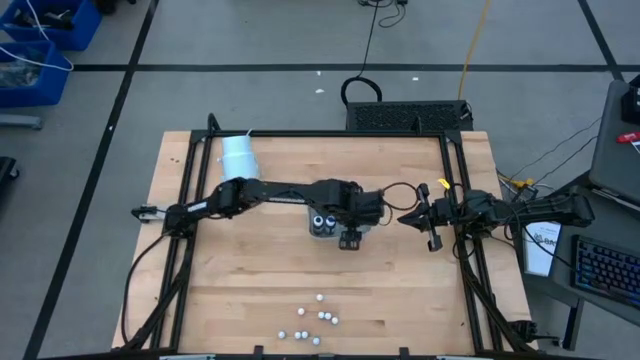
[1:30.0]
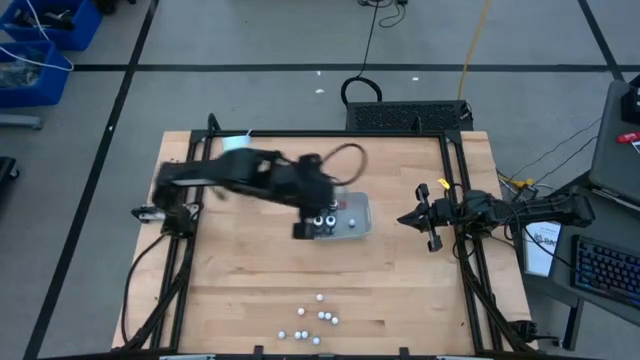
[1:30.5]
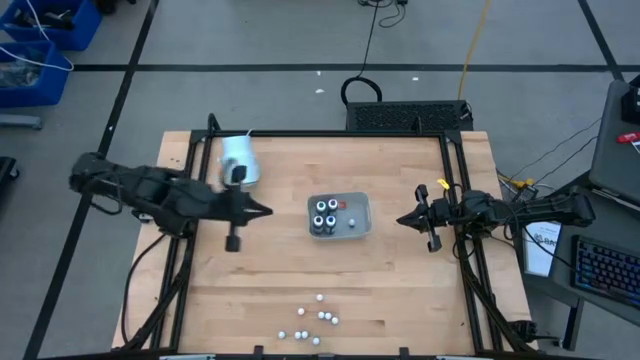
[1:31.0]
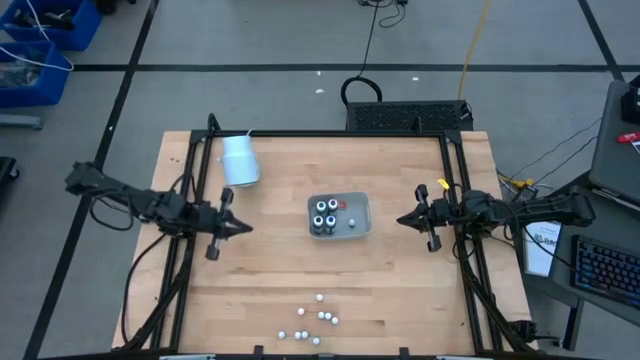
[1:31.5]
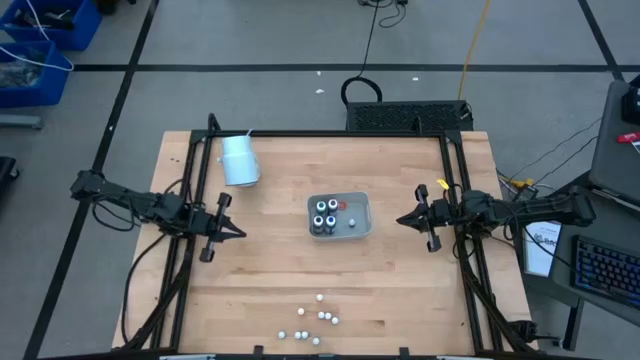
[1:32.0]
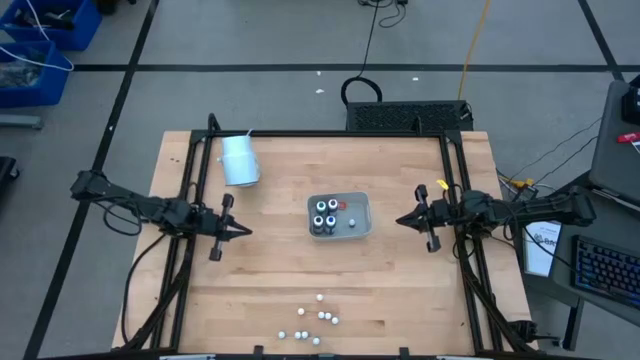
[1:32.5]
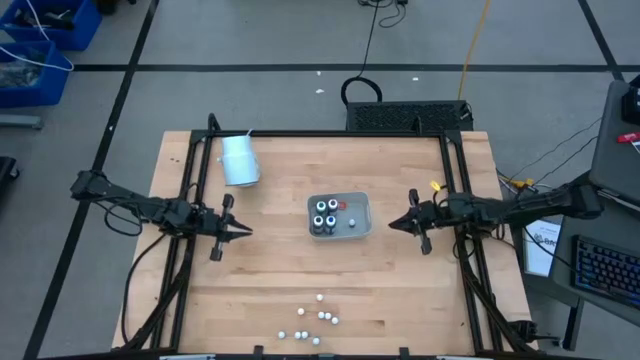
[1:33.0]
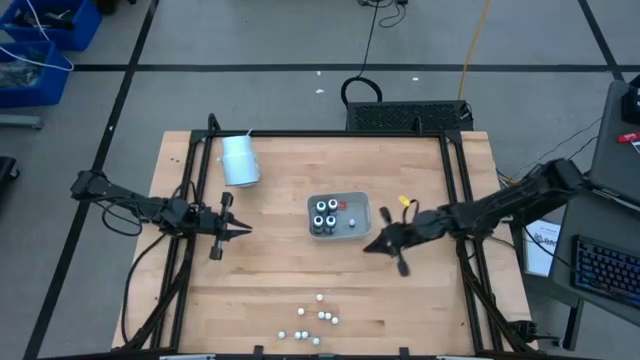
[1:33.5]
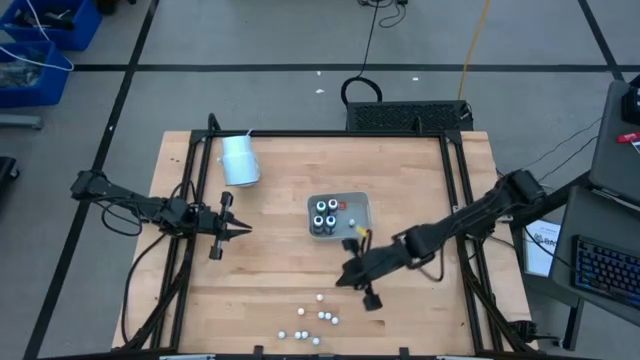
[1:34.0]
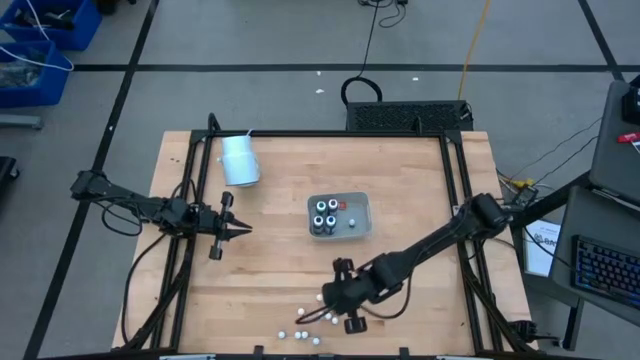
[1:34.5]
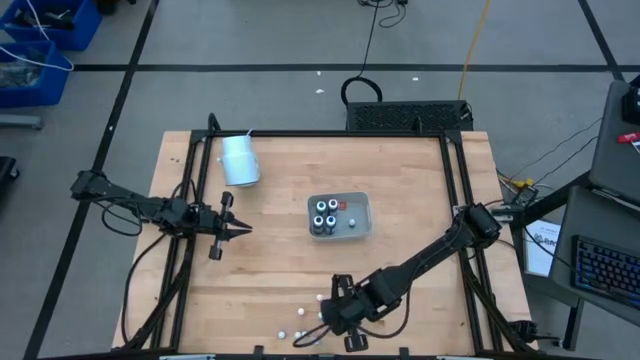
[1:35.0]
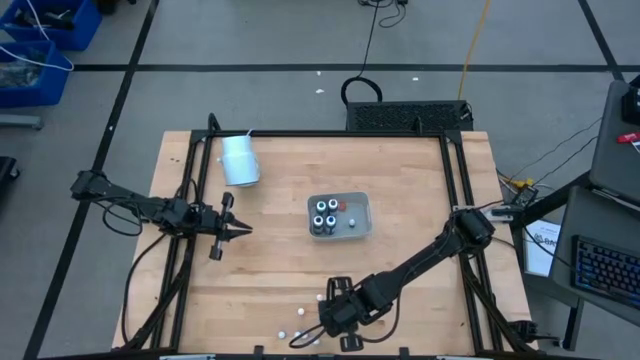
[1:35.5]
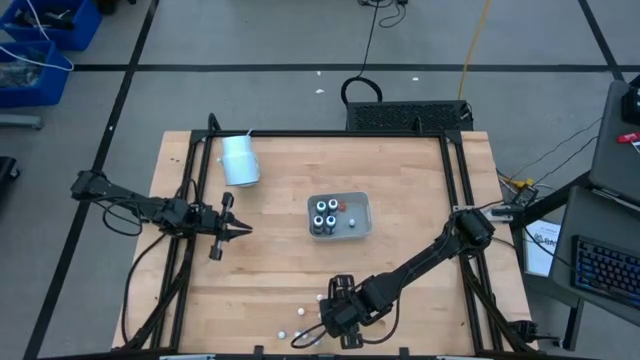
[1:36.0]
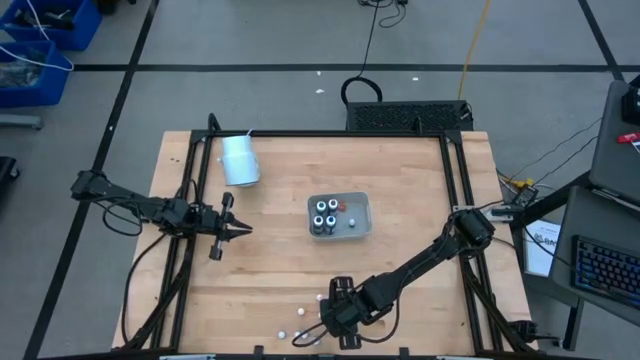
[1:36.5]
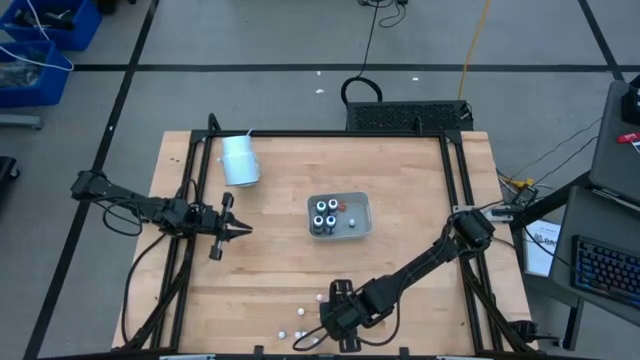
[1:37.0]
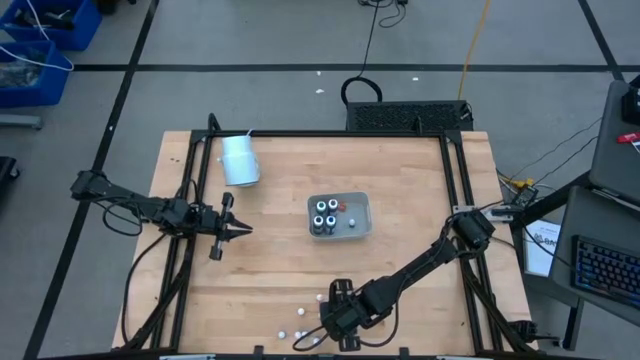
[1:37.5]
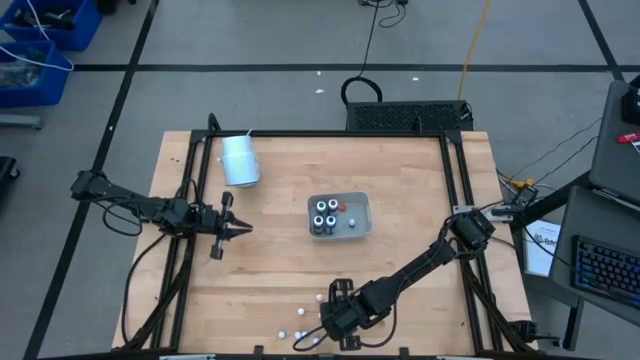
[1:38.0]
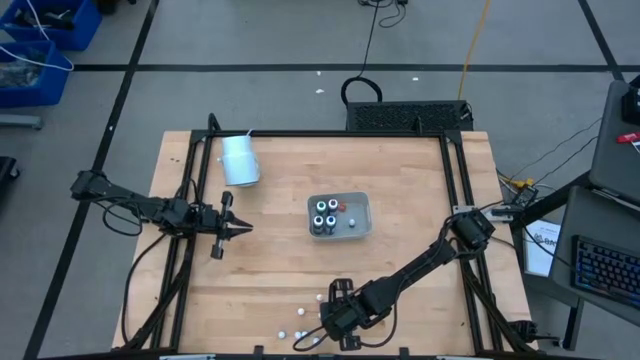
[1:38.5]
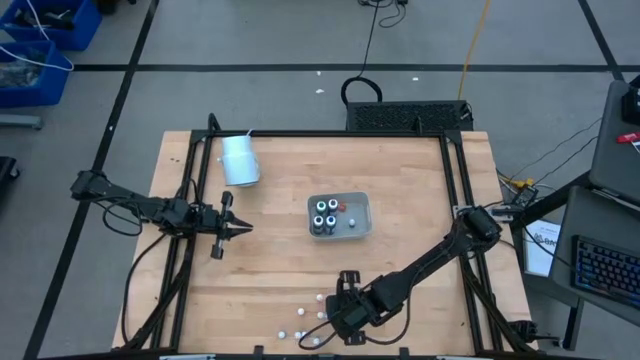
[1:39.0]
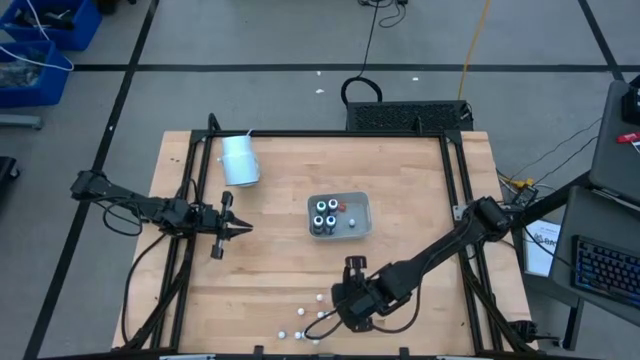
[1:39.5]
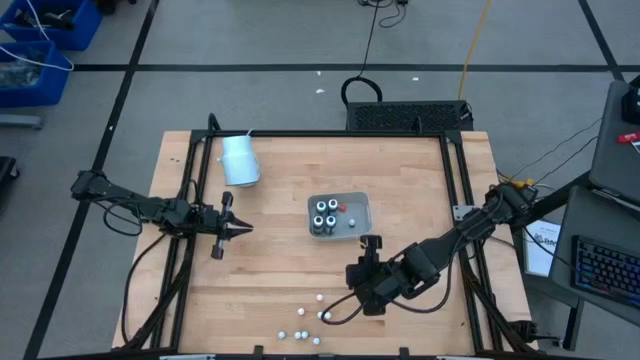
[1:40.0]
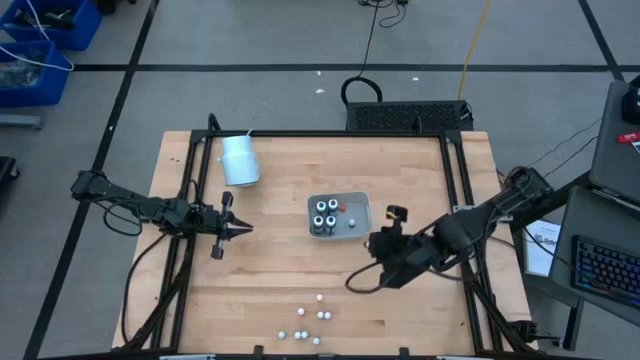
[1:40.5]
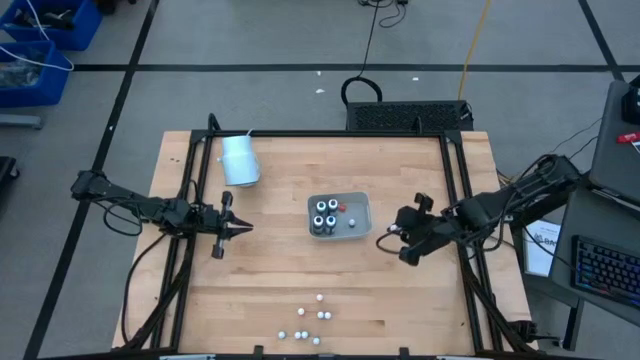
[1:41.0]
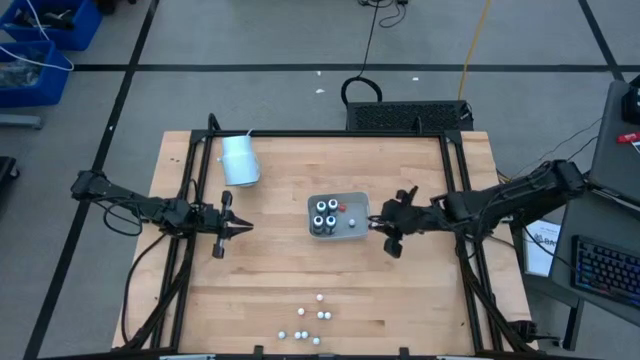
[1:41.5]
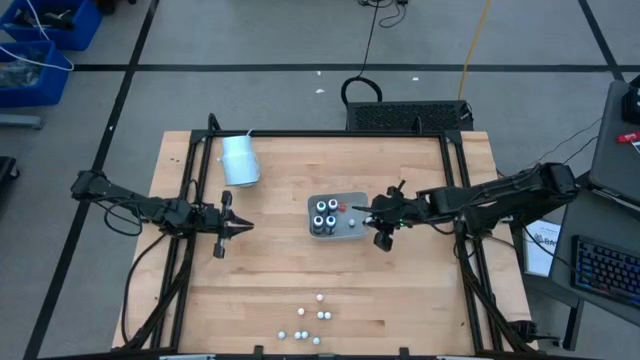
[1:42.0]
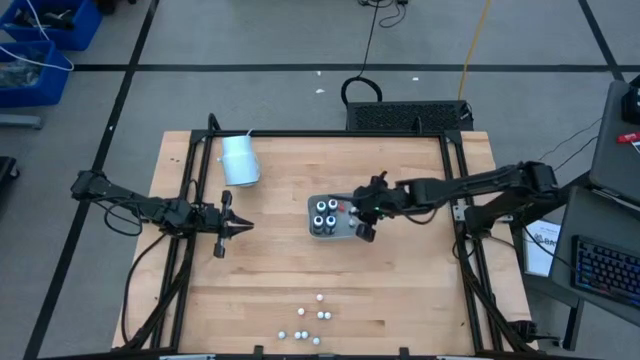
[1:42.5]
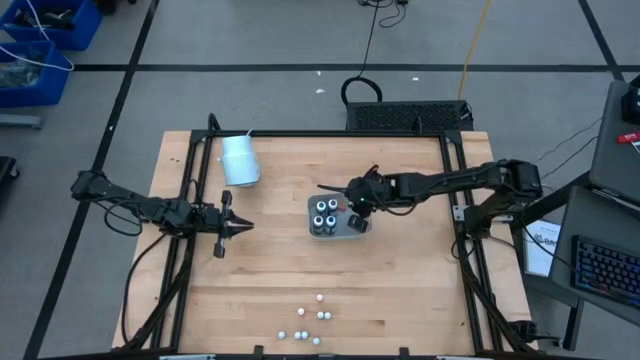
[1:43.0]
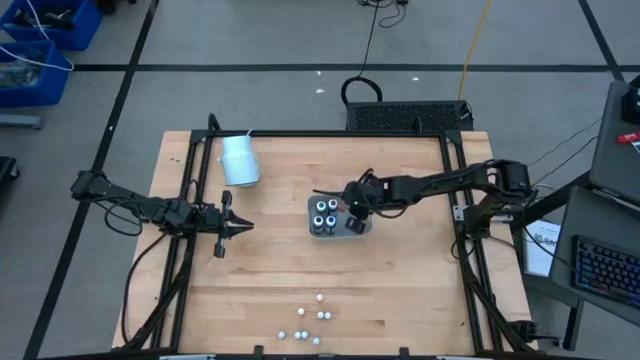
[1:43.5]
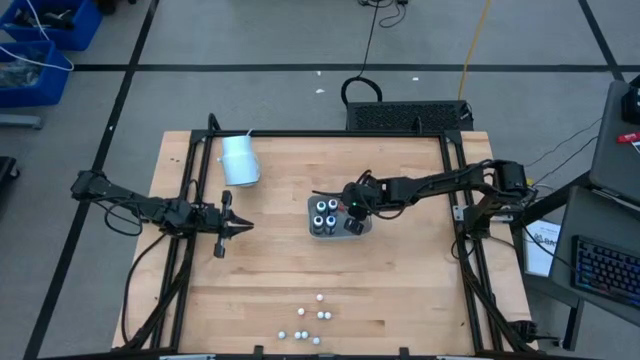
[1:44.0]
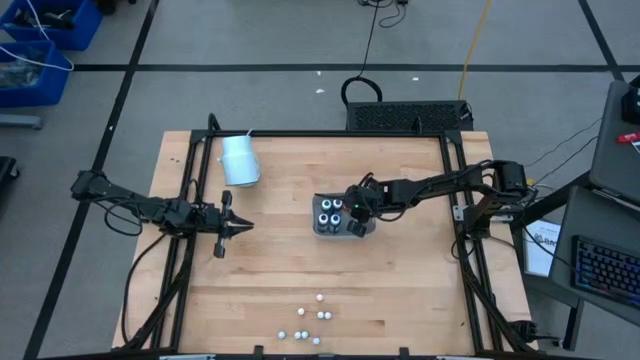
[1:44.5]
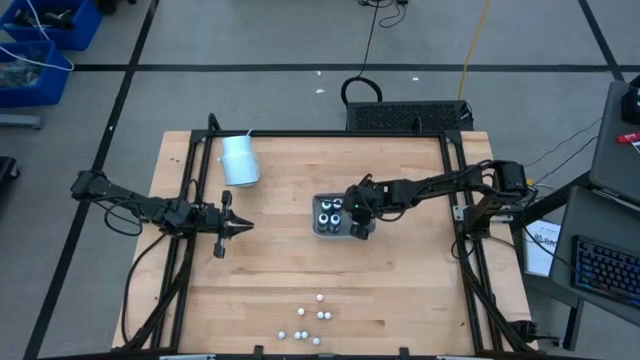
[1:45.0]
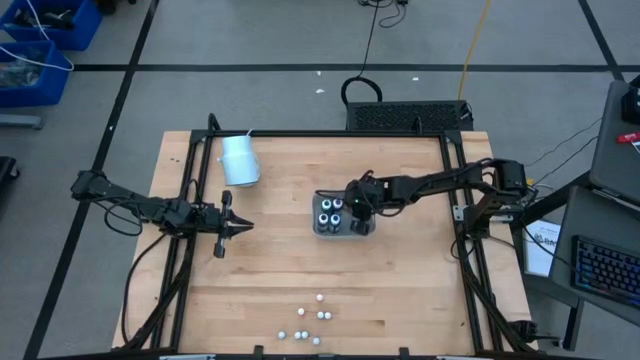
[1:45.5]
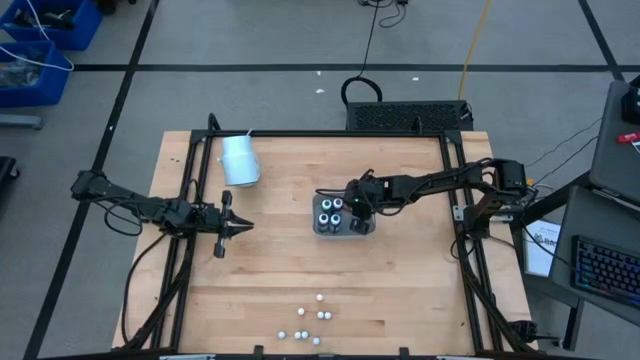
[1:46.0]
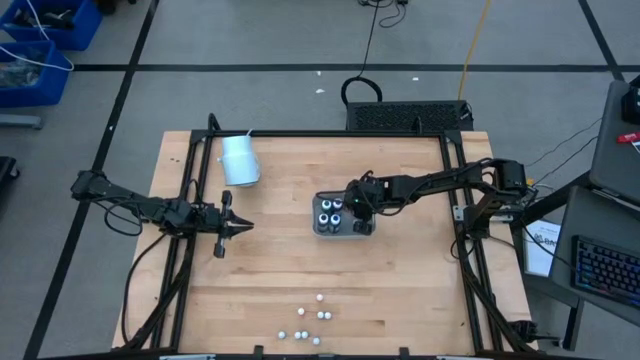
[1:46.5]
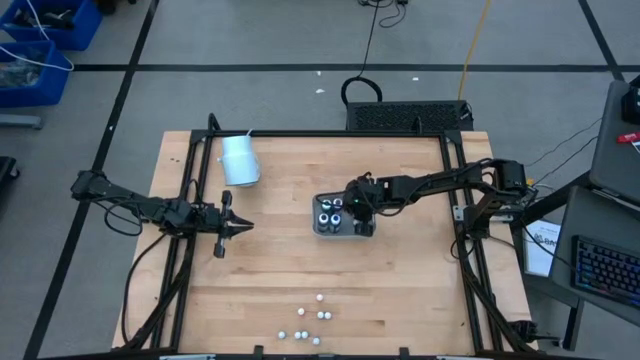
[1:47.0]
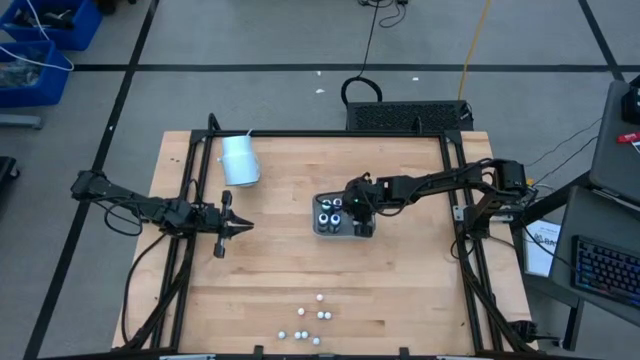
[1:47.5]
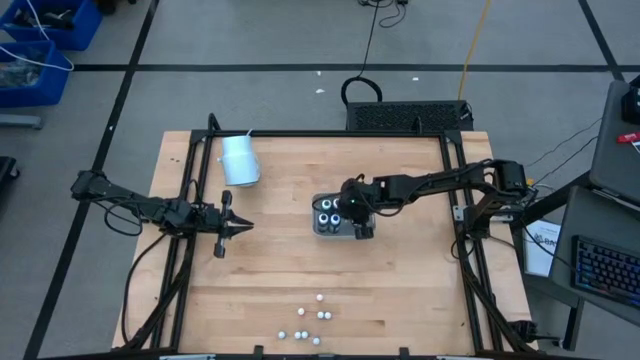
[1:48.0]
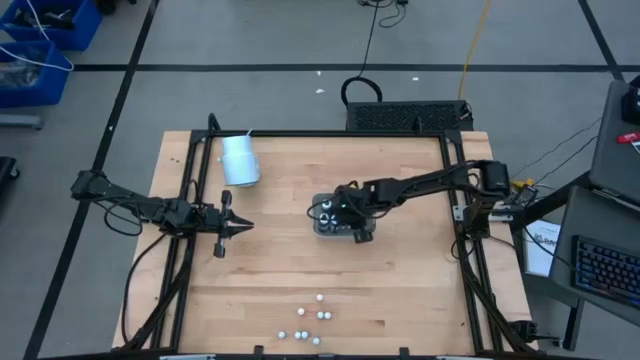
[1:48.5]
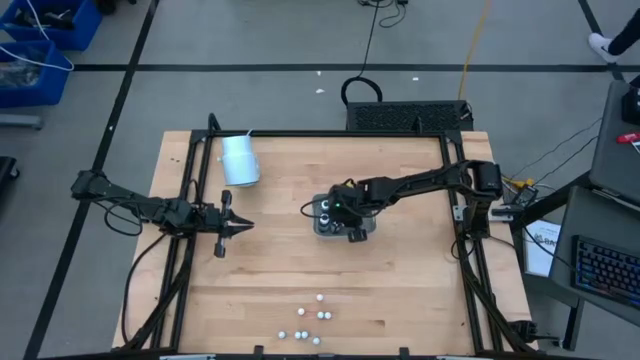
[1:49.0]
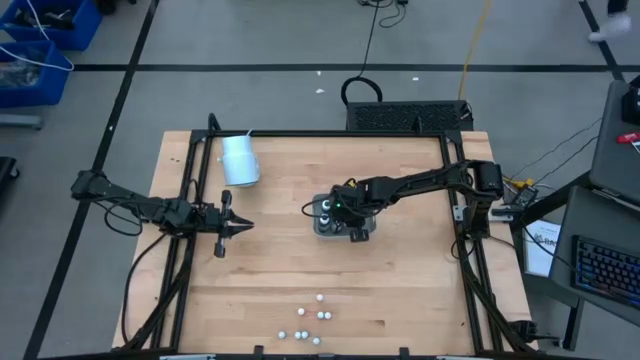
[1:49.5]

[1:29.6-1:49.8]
Task: Pick & Place food coloring
Put the red food coloring bottle into the bin

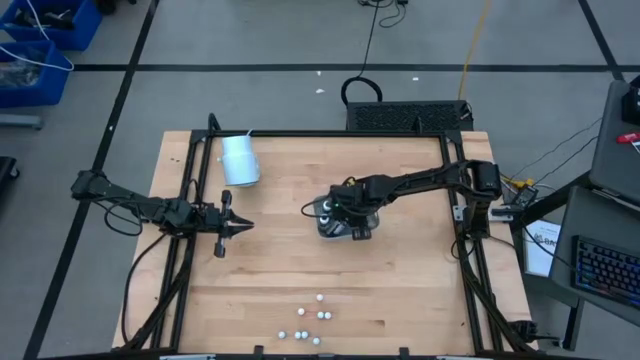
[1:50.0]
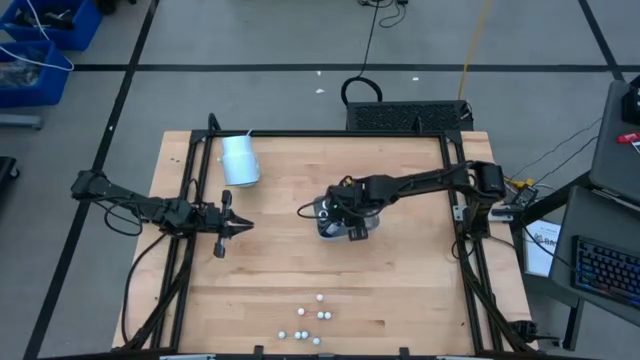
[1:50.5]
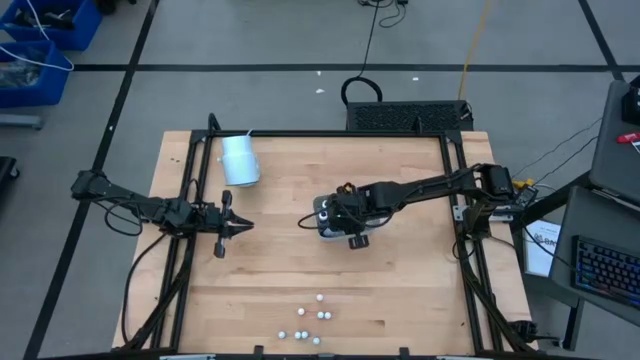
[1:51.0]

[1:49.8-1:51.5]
Adjust the large blue food coloring bottle in the bin

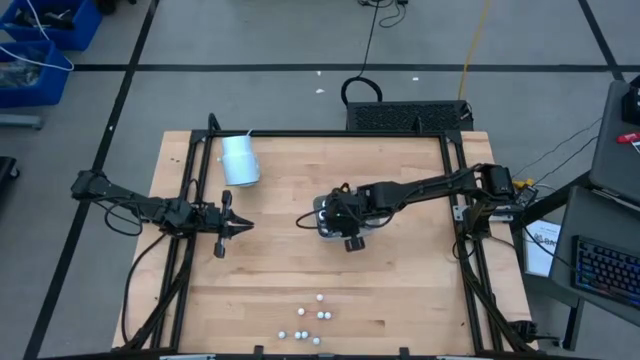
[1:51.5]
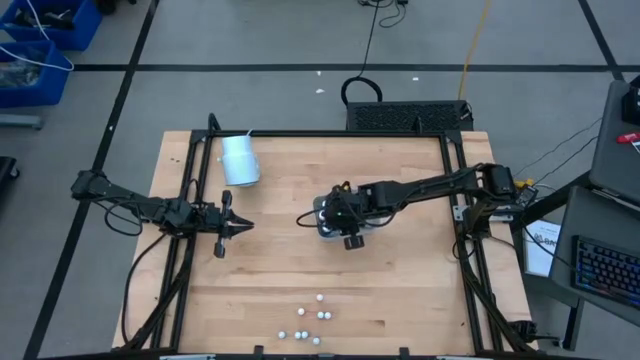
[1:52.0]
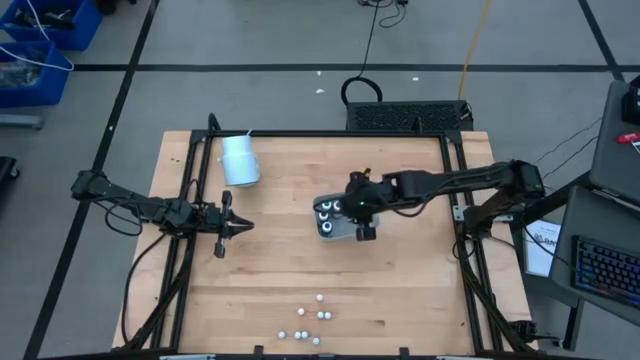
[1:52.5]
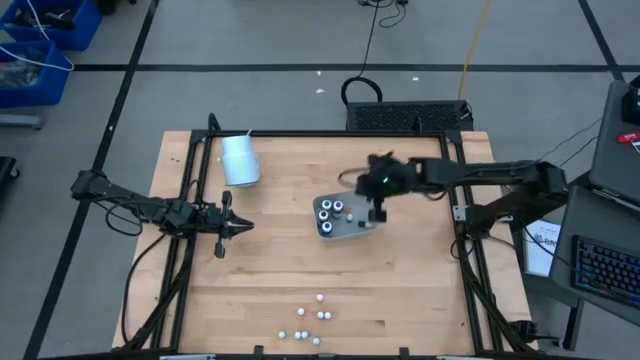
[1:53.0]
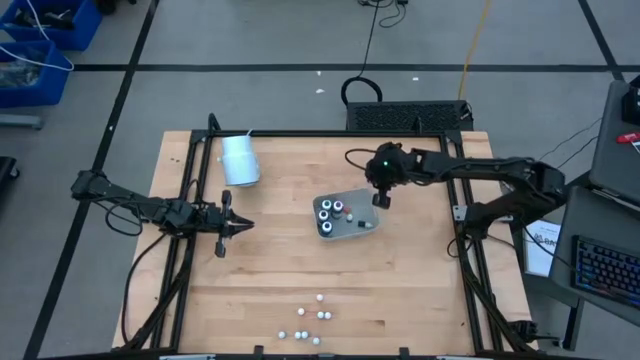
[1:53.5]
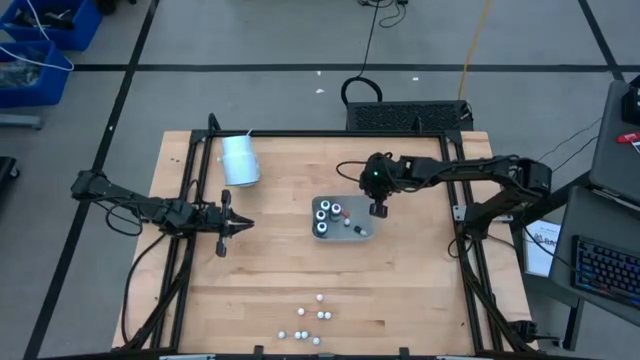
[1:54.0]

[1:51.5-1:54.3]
Adjust the bin
